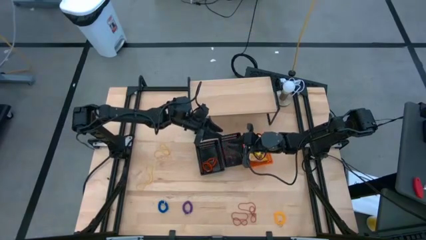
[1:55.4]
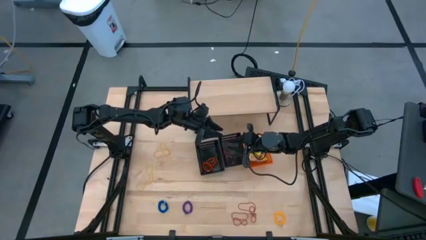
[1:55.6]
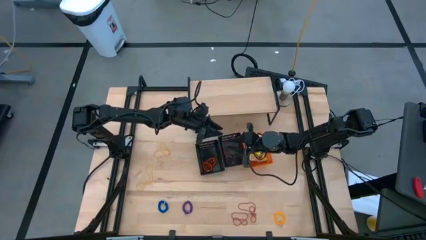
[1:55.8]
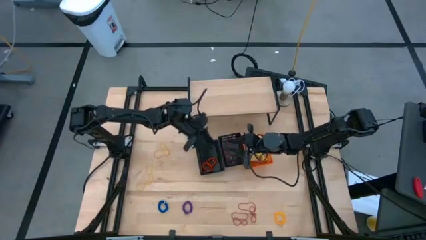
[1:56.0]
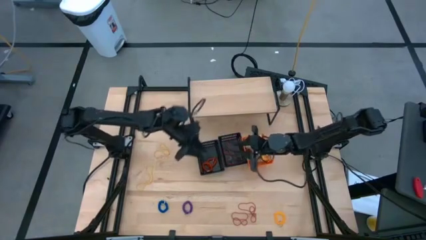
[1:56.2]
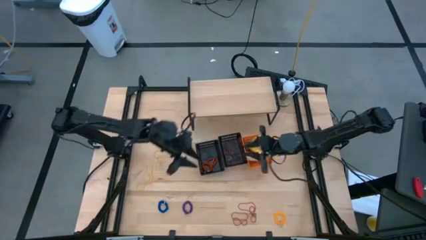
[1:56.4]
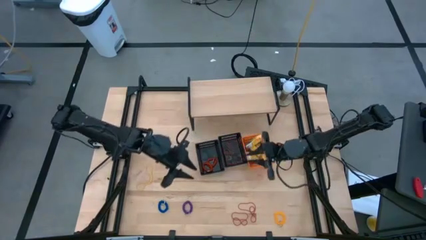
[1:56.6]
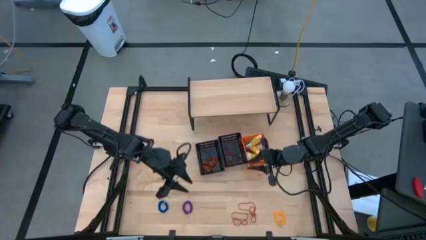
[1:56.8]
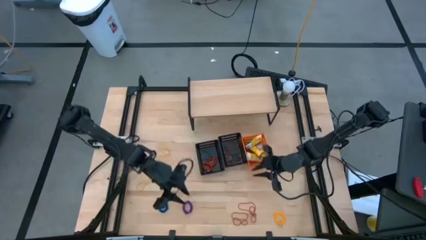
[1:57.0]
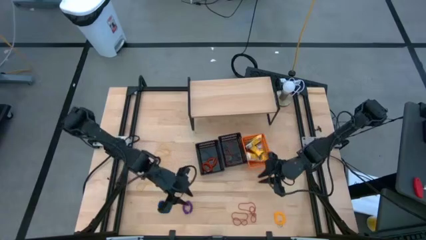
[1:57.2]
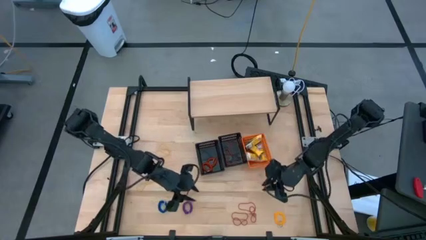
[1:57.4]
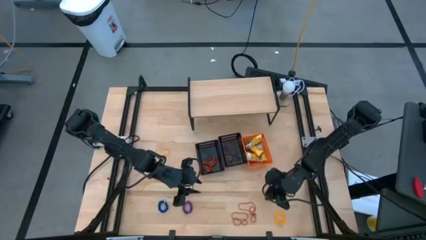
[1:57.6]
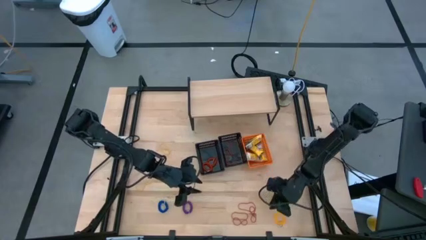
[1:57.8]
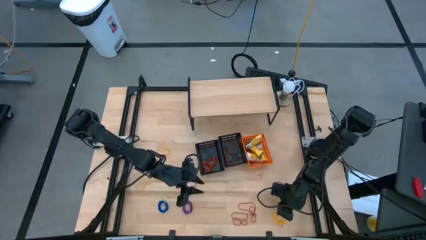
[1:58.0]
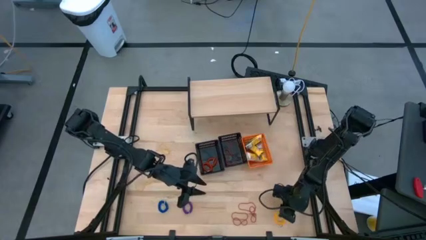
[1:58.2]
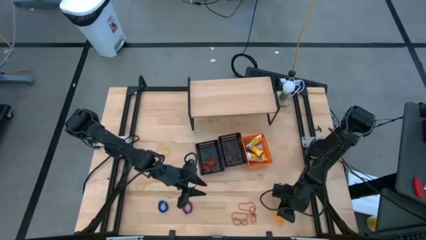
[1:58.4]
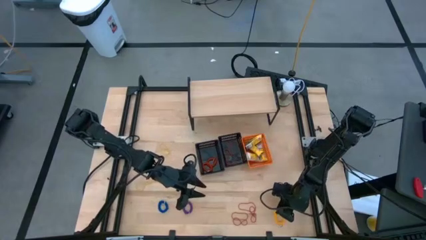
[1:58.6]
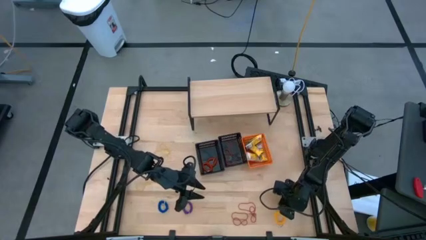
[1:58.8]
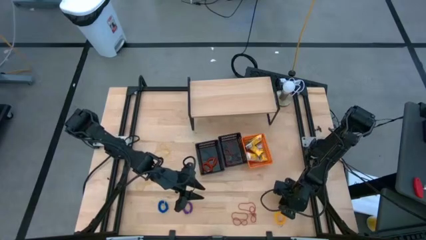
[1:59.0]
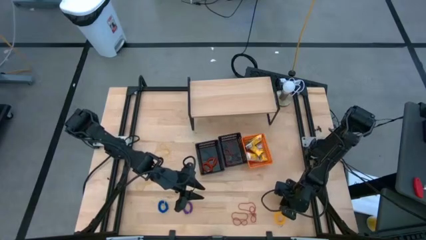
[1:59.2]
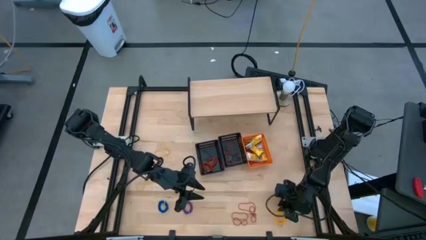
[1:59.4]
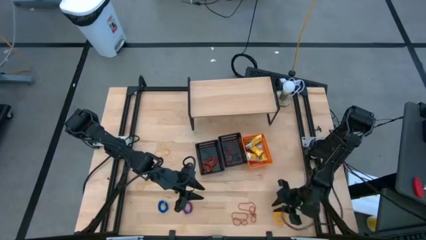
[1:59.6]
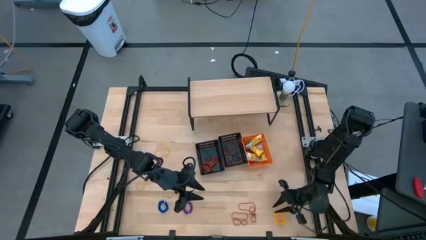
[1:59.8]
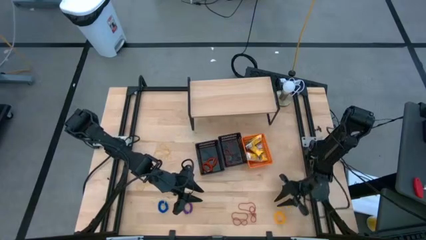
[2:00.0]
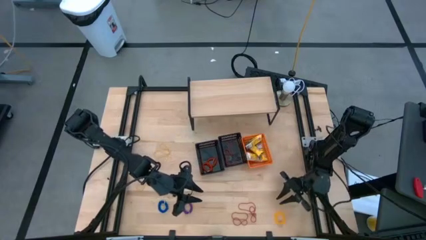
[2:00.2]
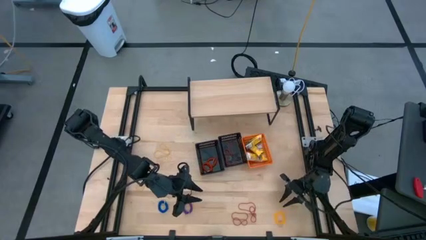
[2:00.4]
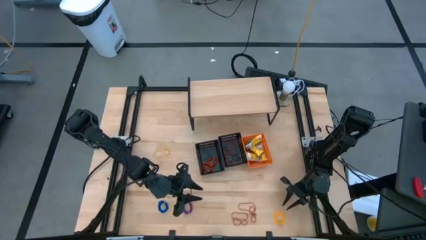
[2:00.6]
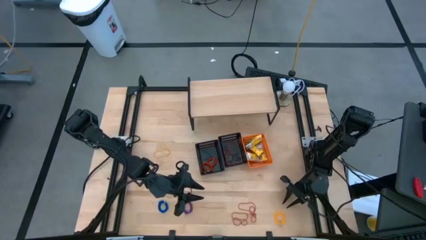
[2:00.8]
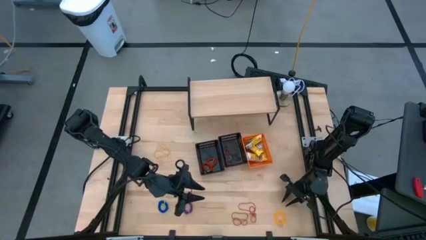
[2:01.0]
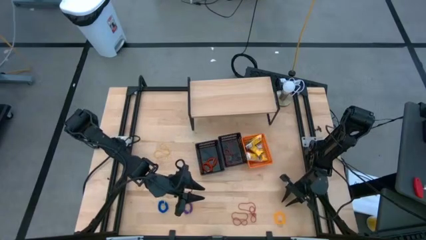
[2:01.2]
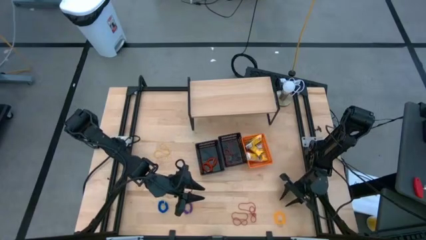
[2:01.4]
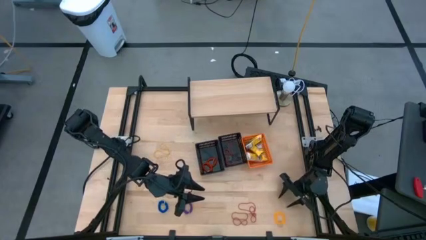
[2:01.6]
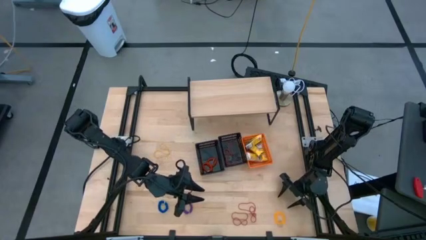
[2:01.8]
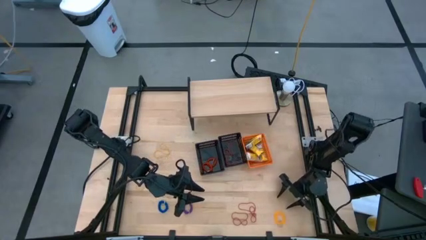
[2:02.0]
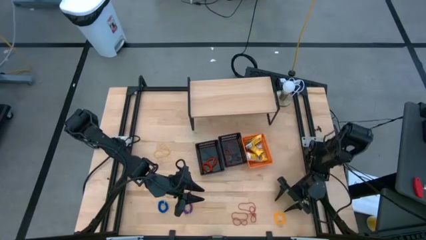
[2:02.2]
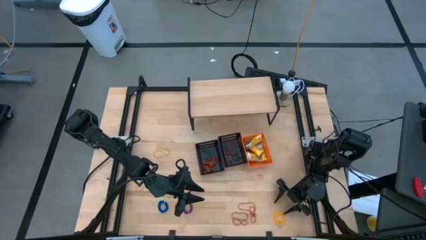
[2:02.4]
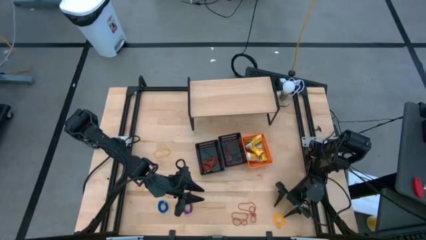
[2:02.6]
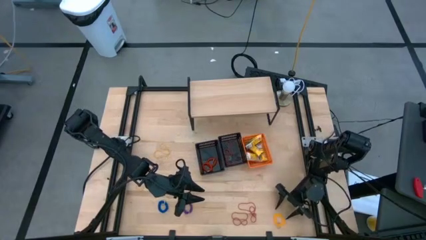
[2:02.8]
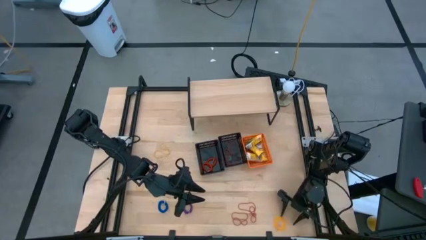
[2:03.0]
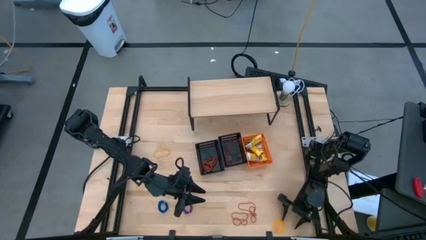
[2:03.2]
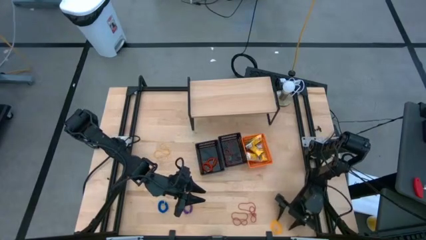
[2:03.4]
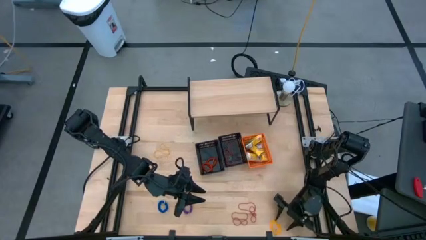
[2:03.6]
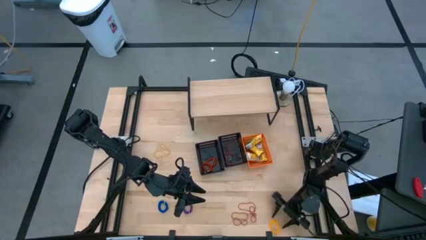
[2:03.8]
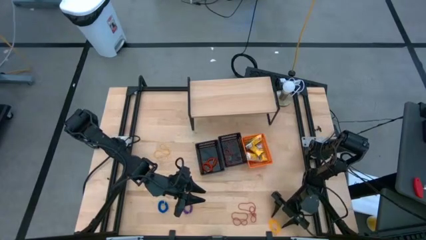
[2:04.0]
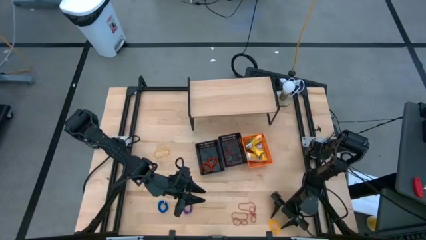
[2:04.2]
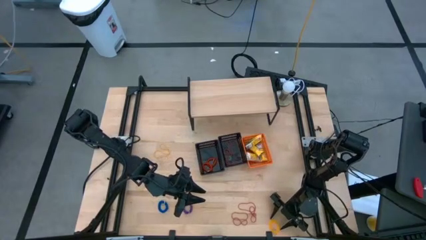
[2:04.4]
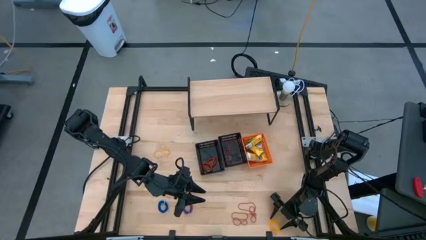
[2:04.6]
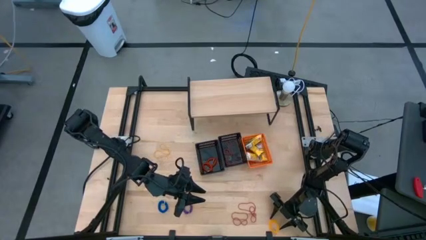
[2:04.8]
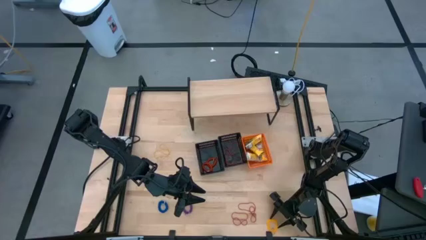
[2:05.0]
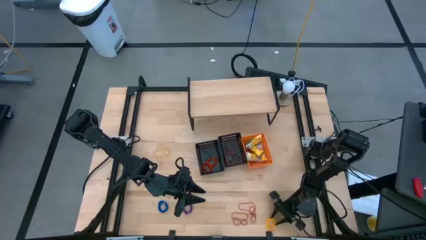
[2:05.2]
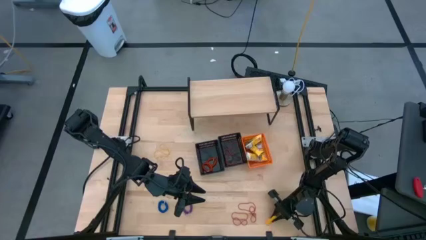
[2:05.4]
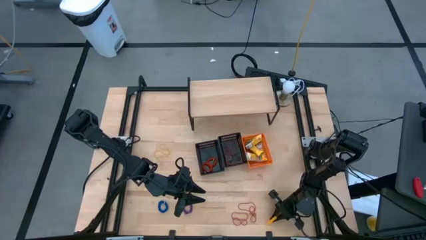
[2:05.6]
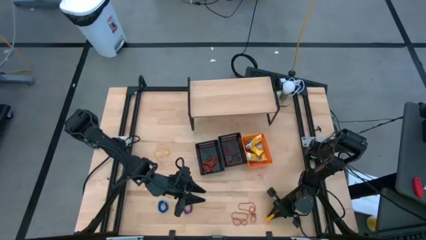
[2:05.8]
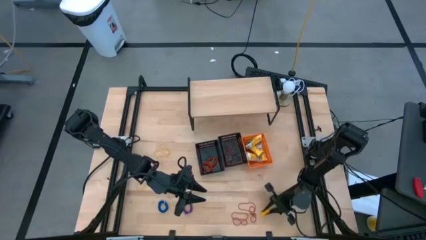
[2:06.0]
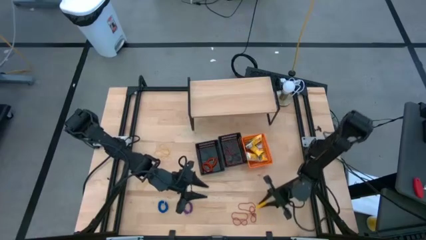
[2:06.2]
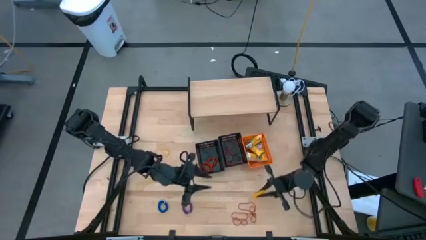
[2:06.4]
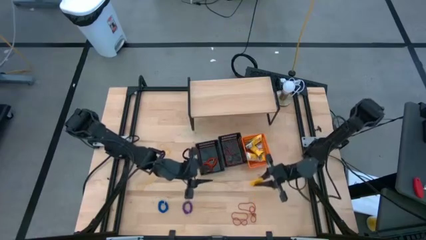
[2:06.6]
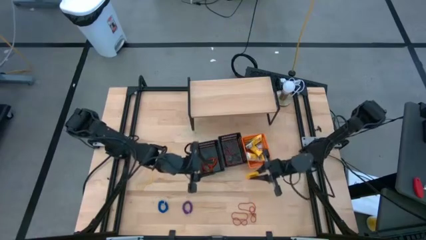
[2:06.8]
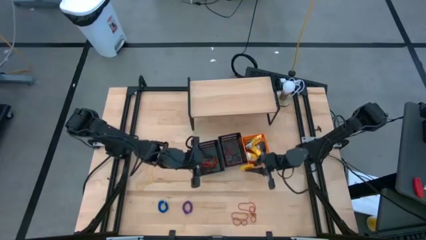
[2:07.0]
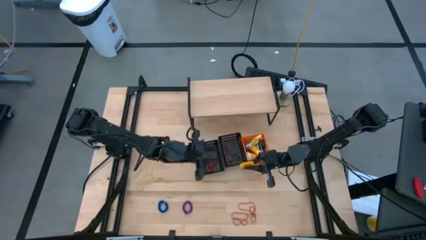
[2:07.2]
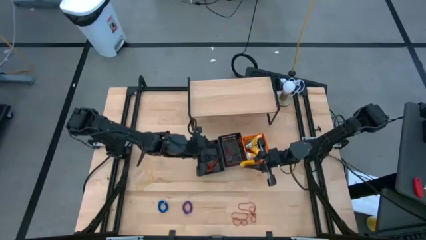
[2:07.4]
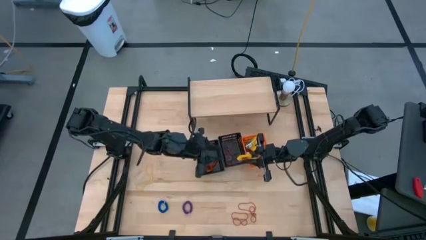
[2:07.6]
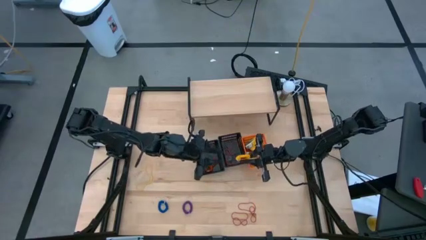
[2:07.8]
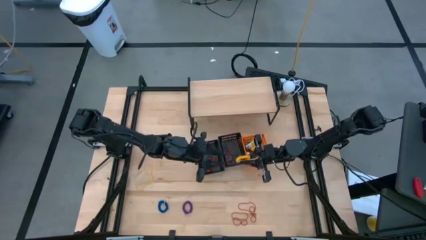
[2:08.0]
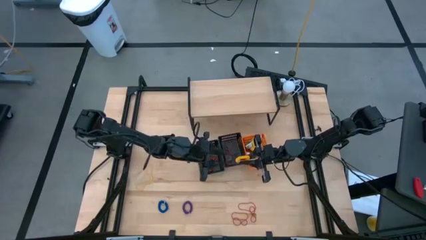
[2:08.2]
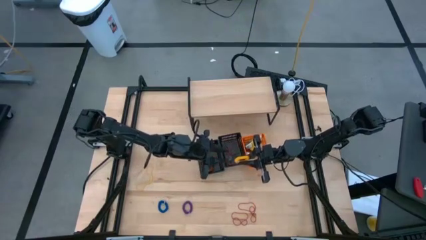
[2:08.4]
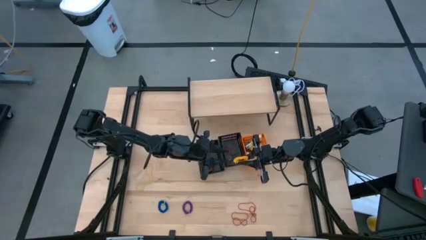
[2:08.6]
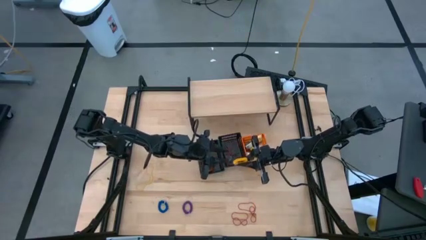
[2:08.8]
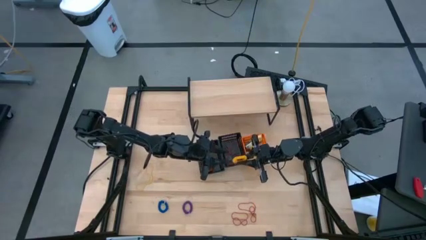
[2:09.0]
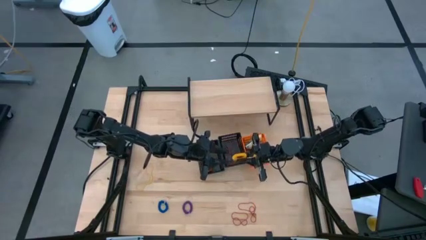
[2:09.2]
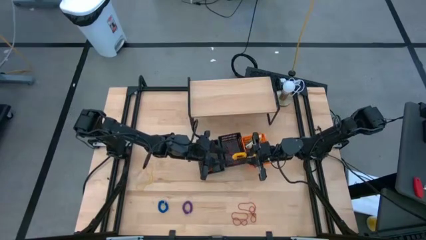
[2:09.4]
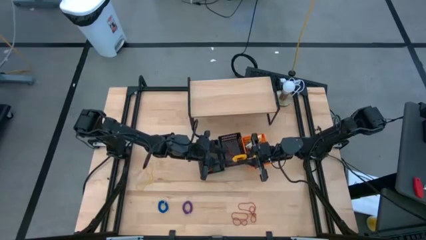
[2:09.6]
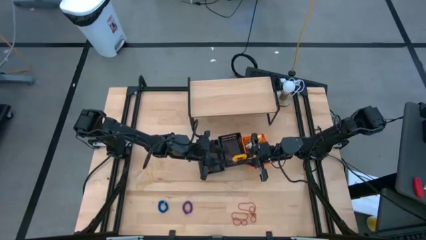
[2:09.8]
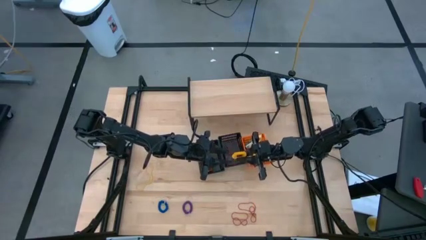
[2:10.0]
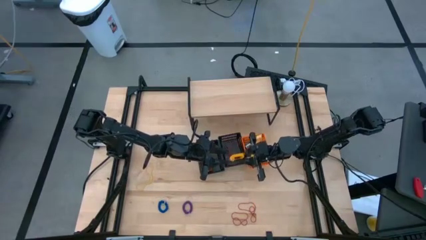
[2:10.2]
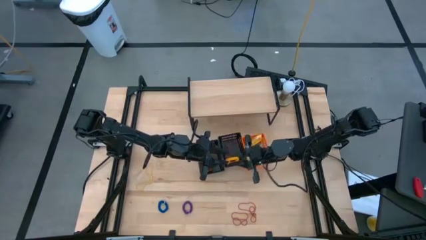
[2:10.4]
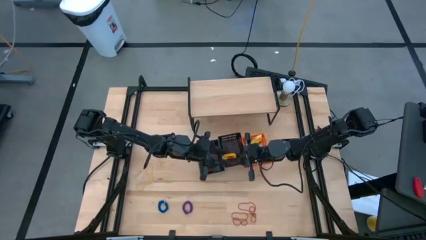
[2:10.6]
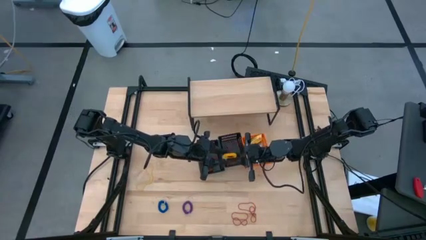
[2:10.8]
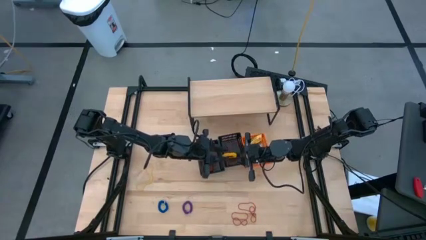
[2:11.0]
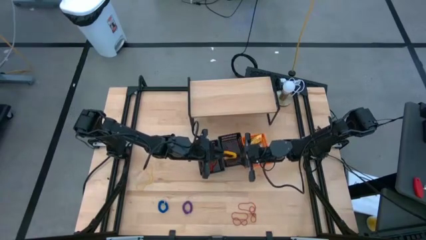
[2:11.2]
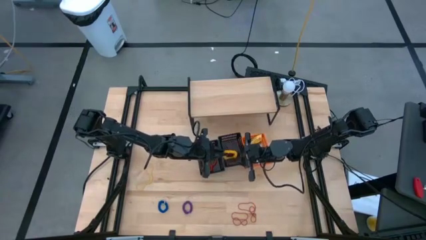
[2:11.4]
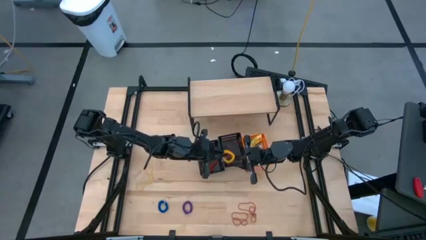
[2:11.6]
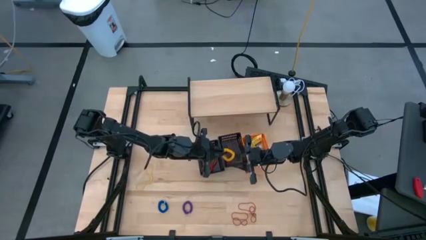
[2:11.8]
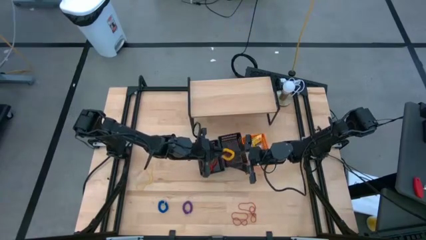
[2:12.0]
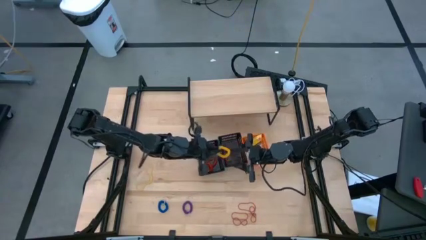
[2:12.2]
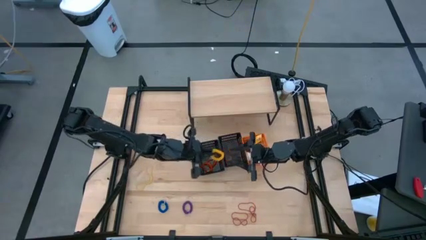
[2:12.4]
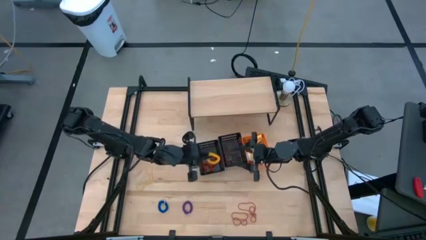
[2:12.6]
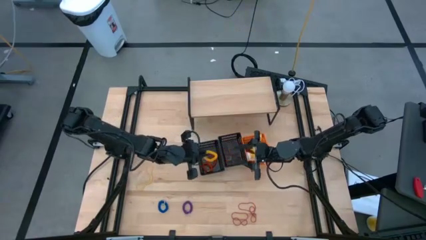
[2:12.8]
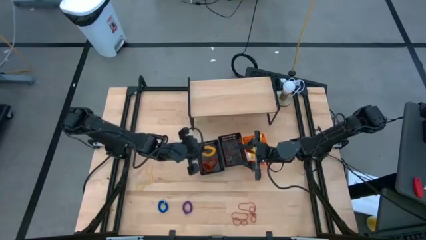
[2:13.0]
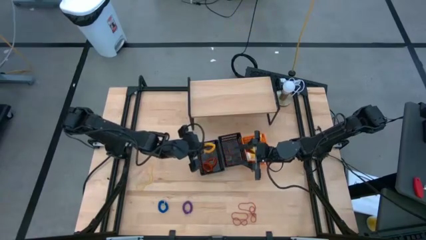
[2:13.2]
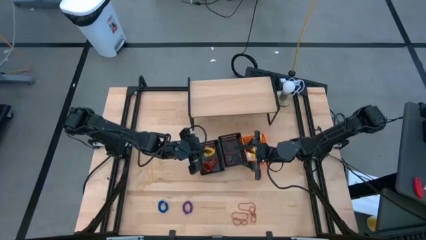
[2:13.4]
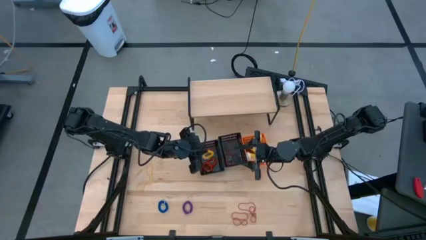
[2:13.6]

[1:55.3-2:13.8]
Task: Pick & Place Office Desk Supplies
Put the yellow spiral keychain tie into the left black bin
